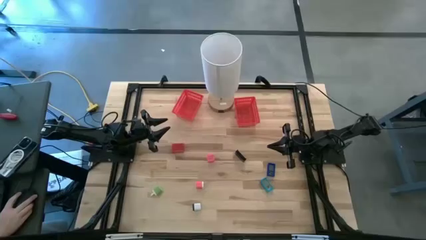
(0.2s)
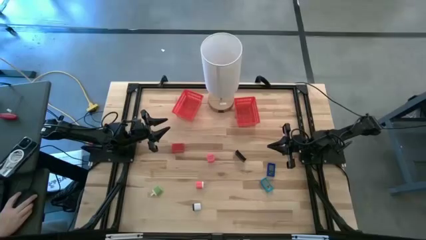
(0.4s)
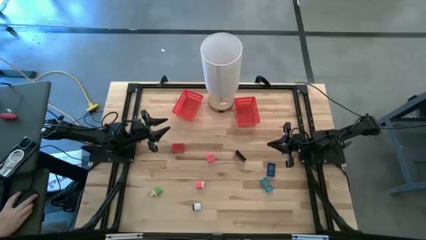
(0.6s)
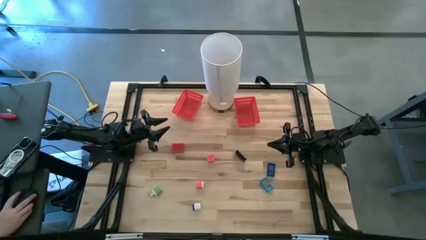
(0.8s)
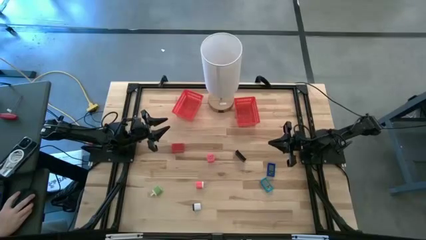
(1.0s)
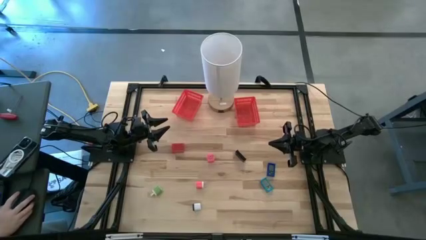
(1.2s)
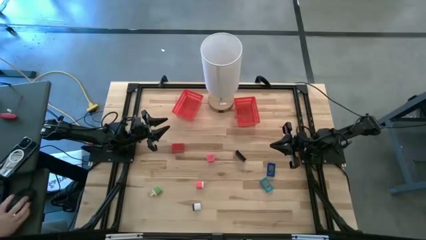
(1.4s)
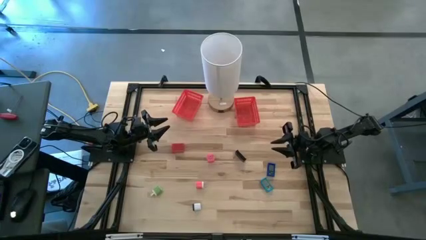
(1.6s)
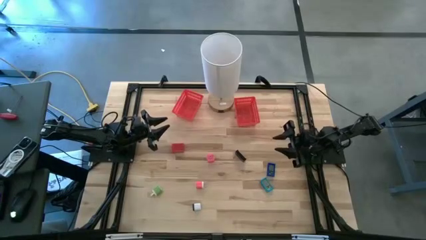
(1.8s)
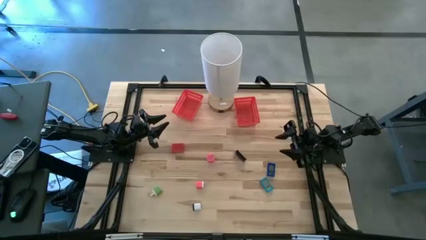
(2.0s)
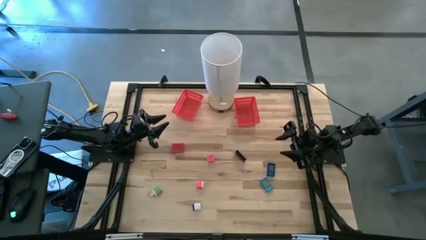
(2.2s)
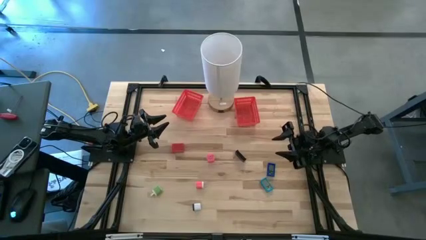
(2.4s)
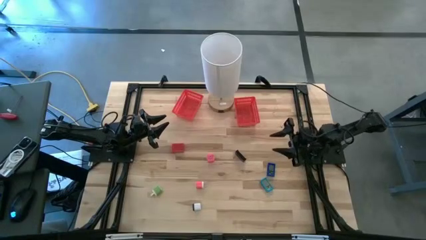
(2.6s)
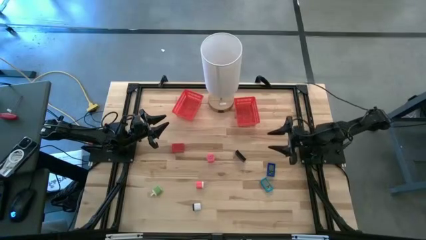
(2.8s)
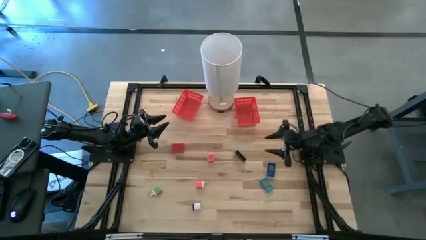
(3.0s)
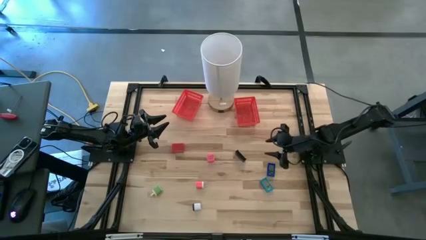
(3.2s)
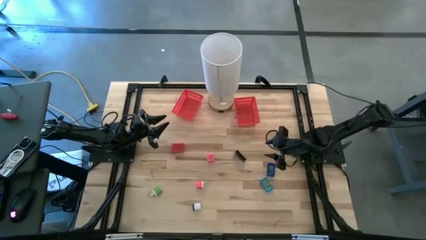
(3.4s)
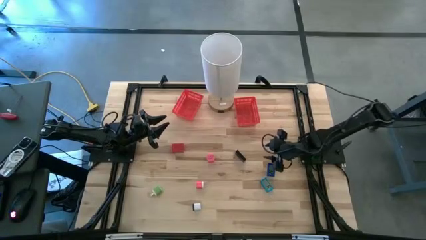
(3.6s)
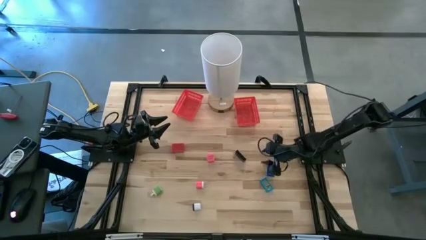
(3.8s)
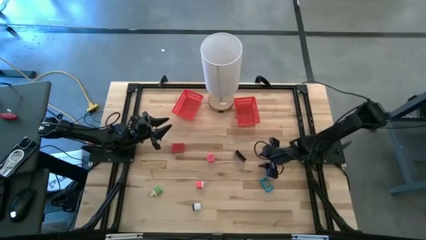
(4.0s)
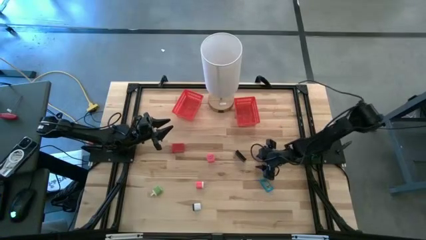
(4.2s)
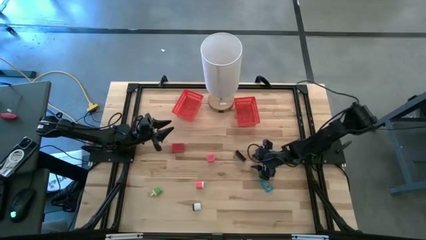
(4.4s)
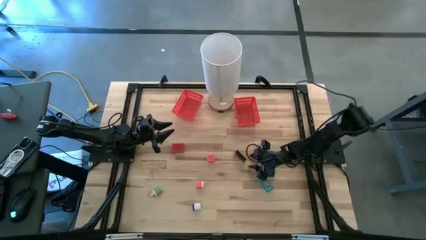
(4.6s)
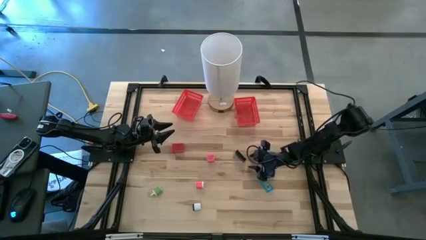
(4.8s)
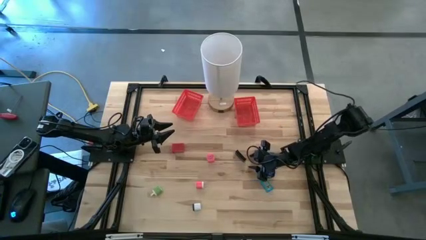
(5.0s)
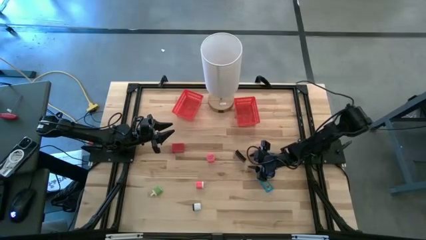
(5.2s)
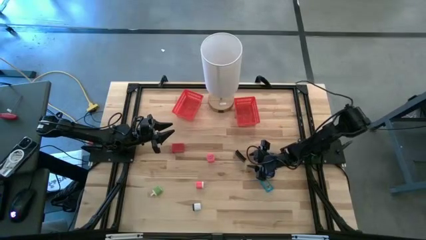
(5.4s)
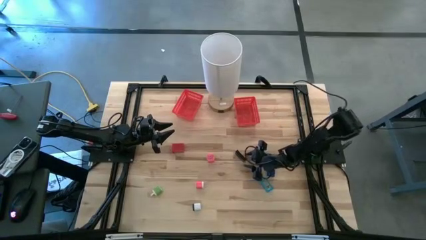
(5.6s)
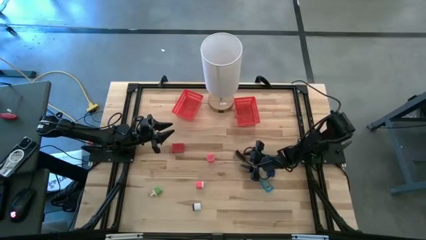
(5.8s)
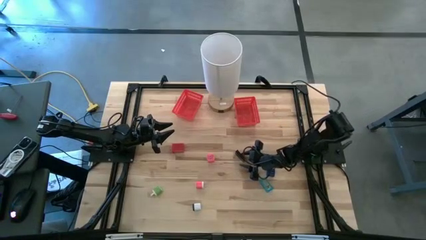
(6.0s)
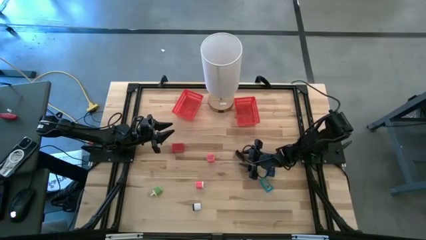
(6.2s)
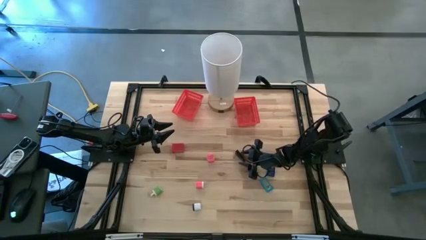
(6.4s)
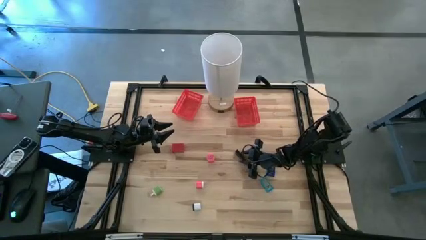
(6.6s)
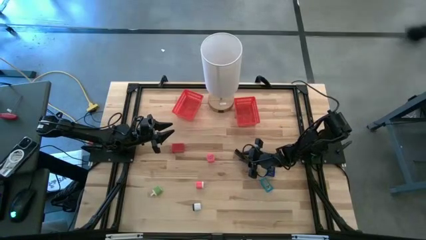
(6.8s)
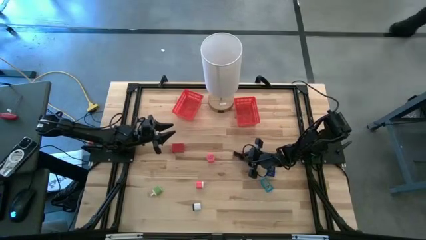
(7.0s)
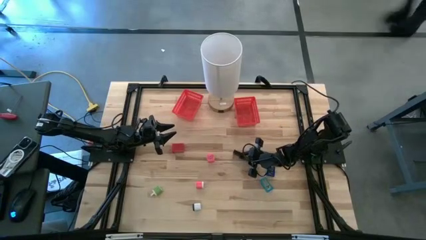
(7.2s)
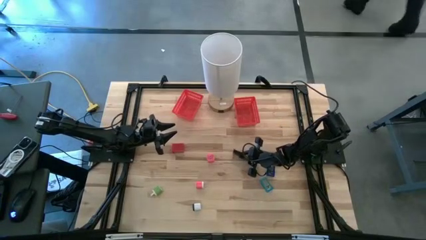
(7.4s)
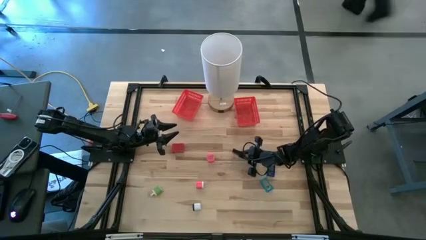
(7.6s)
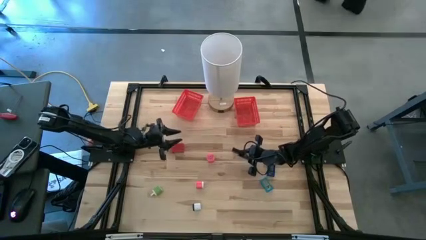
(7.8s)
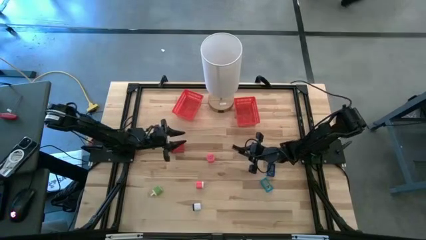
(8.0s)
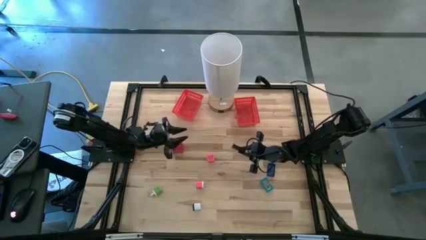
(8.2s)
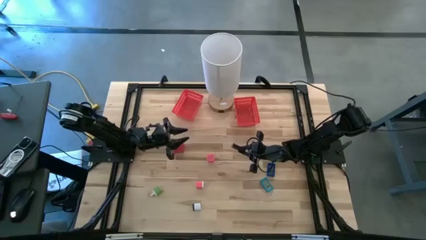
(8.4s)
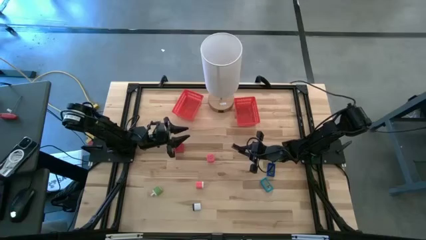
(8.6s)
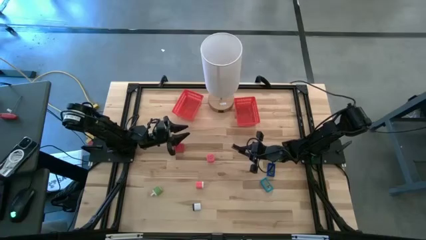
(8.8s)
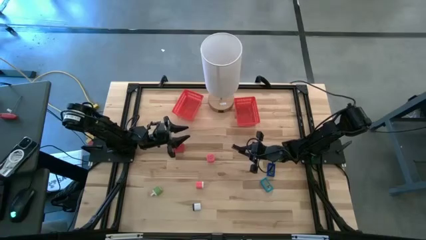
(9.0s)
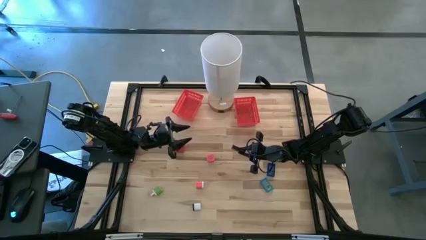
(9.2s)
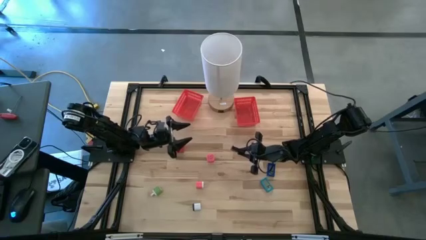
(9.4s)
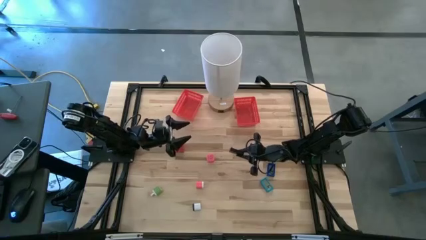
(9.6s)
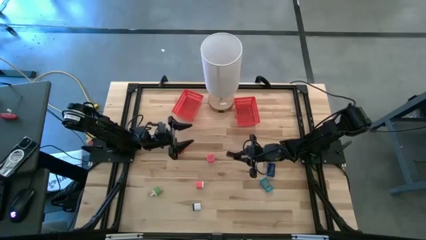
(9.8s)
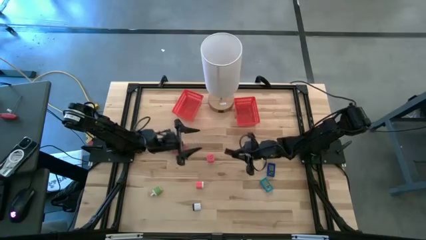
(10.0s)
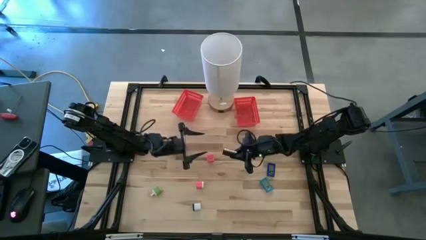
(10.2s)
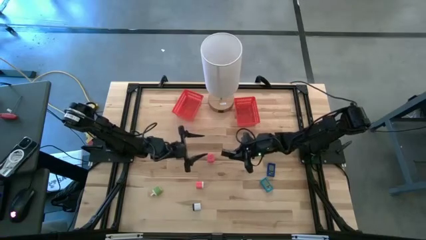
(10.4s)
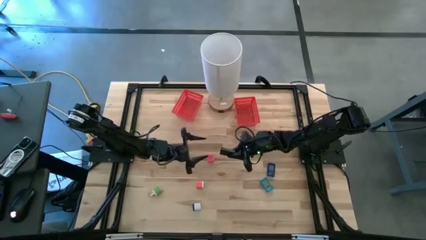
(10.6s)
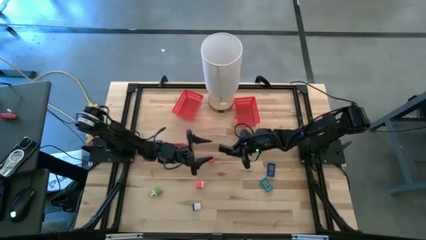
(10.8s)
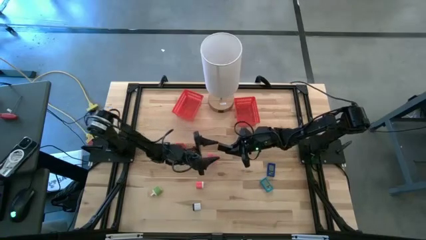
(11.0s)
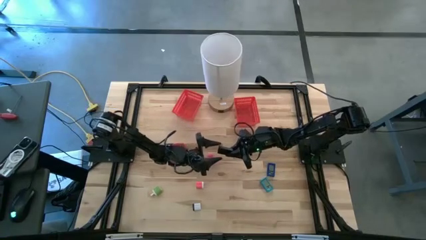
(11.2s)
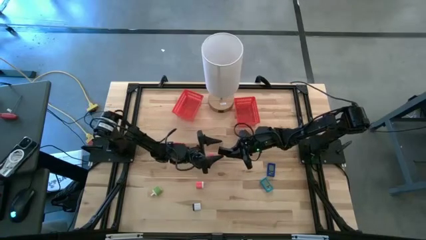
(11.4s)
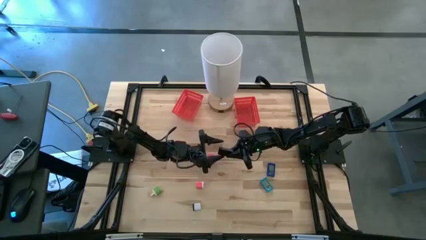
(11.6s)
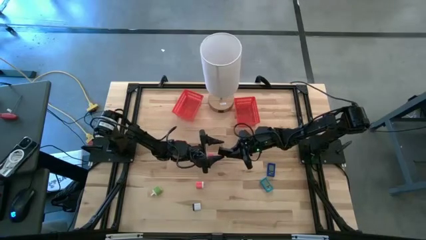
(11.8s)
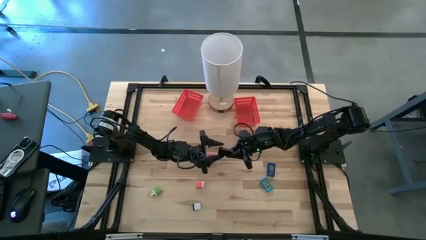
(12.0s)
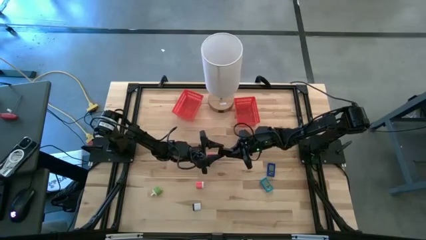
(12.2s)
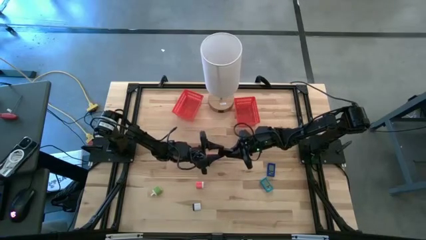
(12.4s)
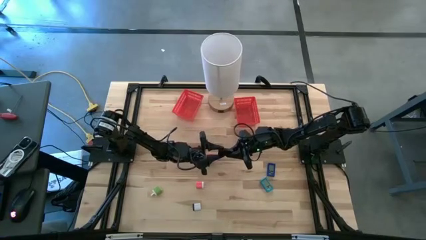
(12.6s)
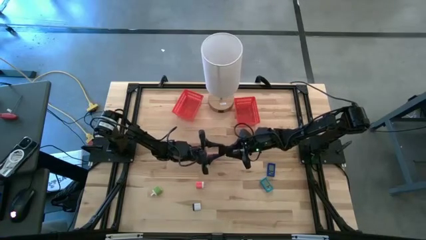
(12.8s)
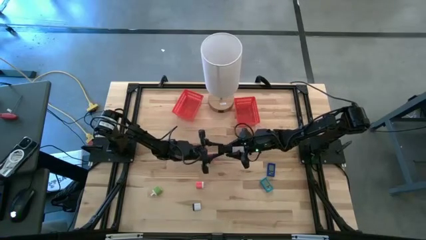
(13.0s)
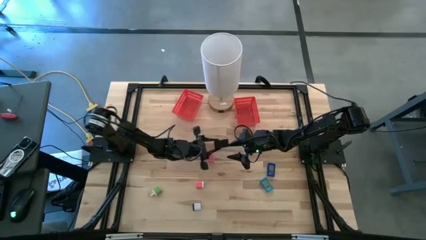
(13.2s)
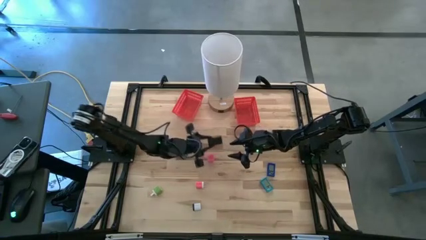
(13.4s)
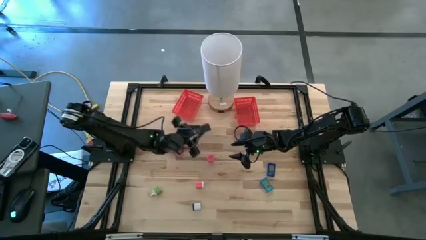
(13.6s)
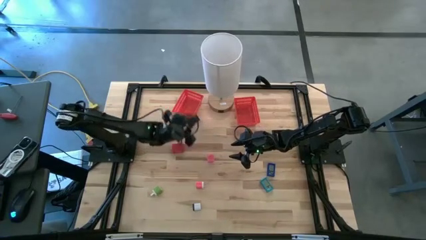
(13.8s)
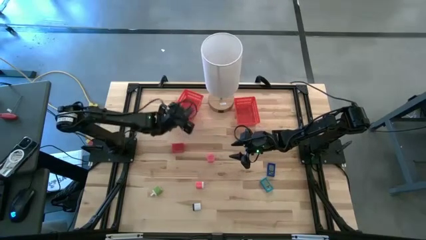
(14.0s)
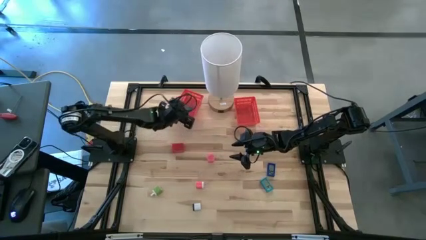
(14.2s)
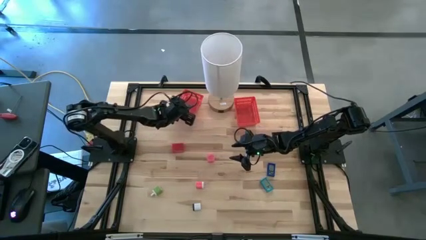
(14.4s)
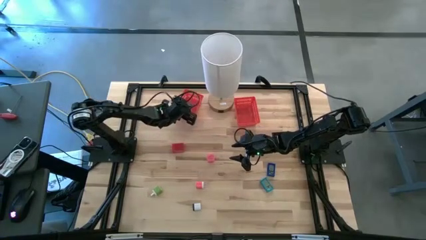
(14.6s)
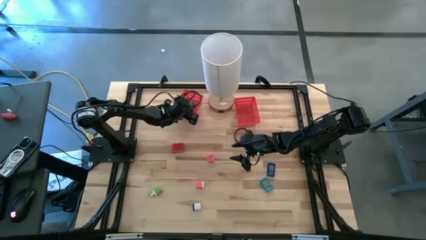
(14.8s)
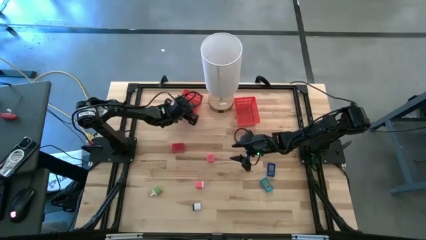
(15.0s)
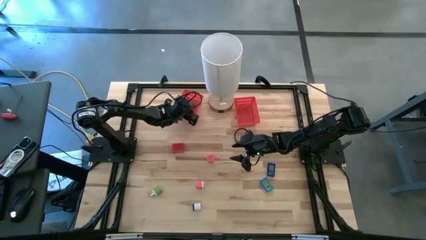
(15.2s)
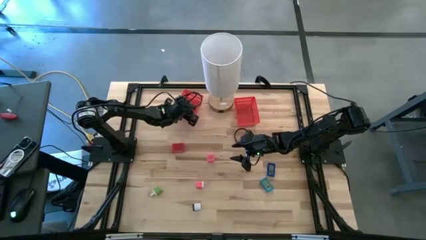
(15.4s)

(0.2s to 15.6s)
Task: Sort adapters and digital timers
Put the black digital timer into the left red bin
